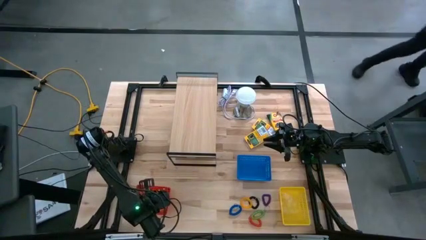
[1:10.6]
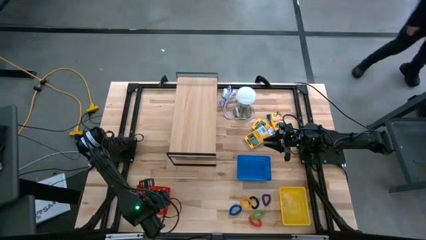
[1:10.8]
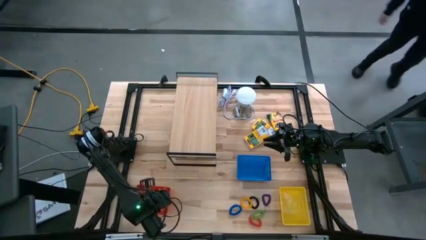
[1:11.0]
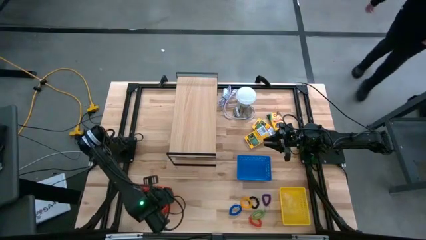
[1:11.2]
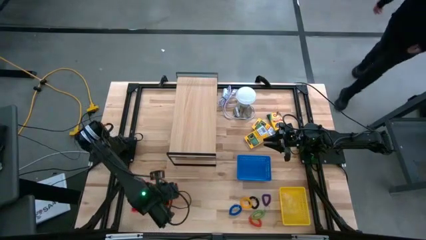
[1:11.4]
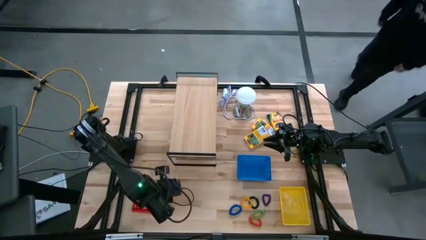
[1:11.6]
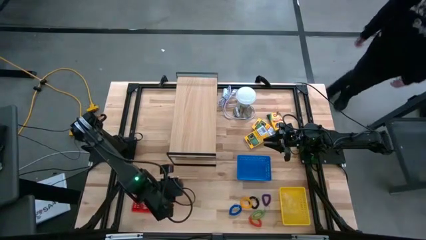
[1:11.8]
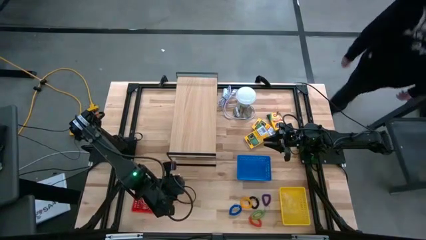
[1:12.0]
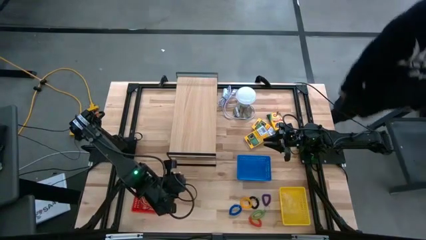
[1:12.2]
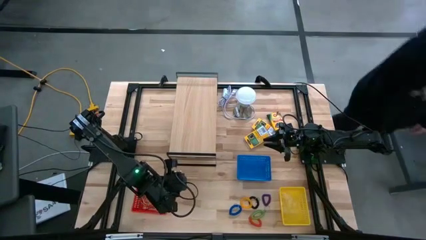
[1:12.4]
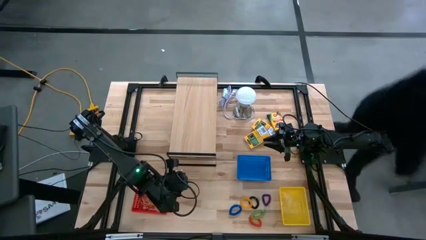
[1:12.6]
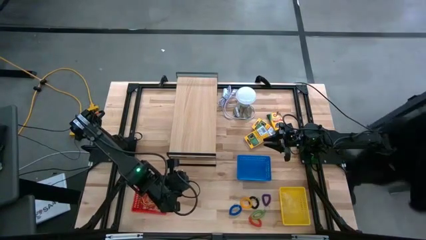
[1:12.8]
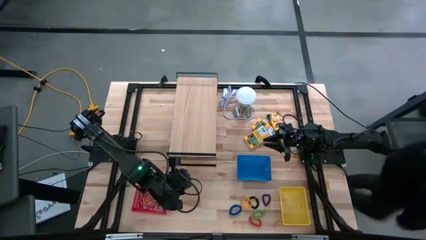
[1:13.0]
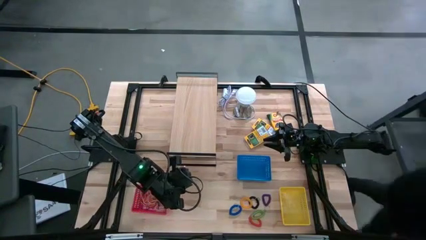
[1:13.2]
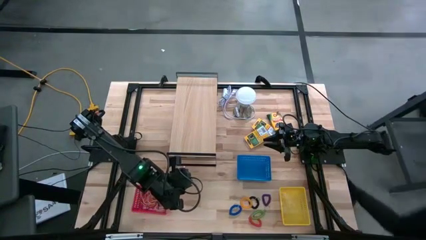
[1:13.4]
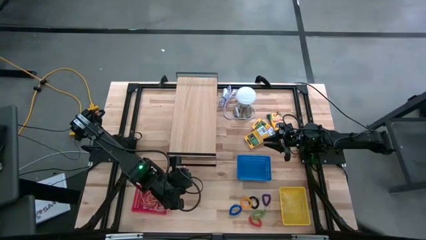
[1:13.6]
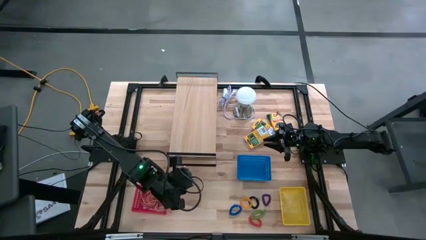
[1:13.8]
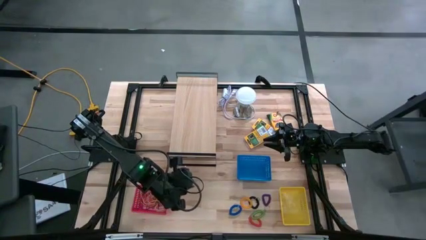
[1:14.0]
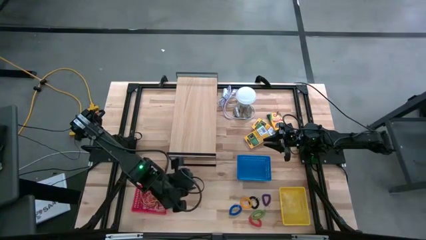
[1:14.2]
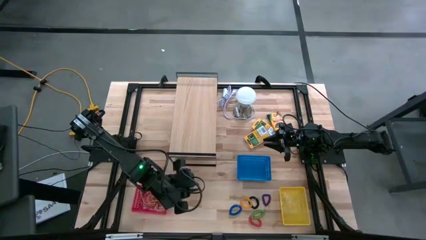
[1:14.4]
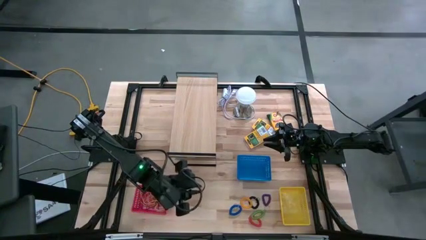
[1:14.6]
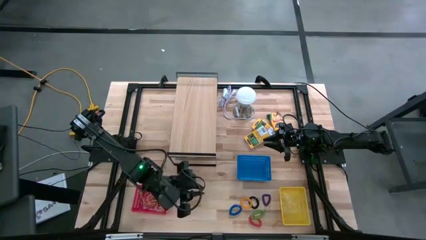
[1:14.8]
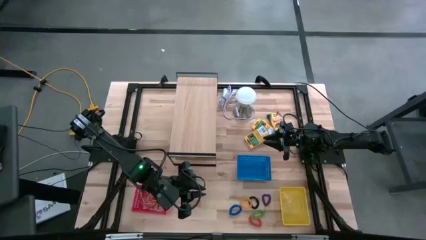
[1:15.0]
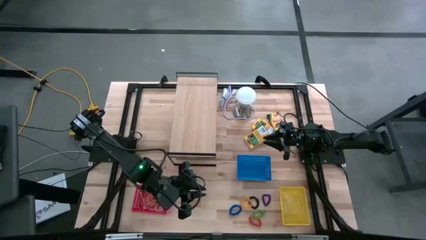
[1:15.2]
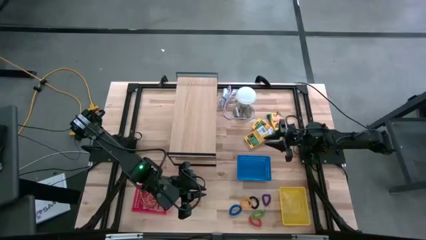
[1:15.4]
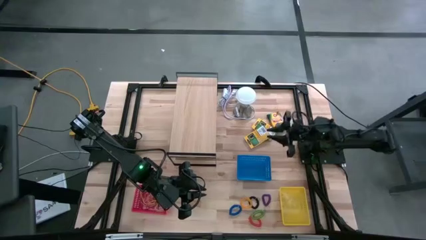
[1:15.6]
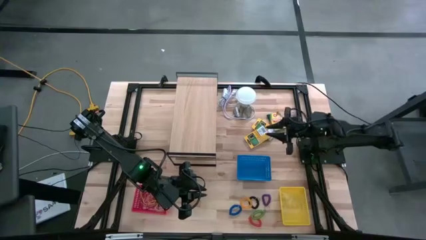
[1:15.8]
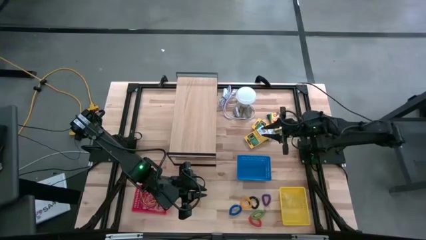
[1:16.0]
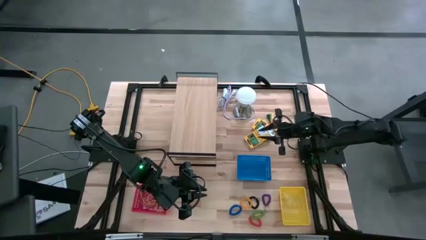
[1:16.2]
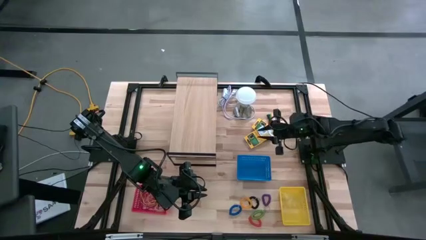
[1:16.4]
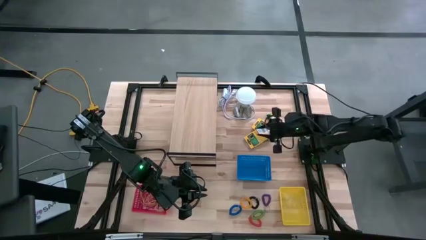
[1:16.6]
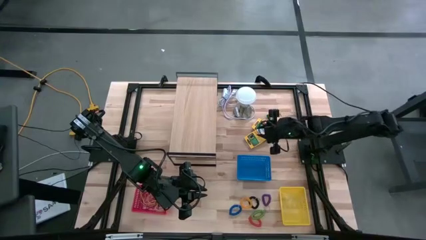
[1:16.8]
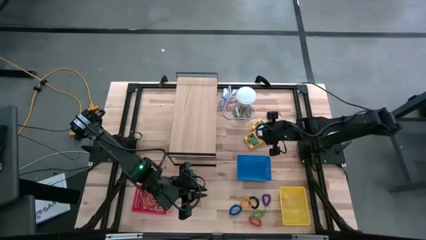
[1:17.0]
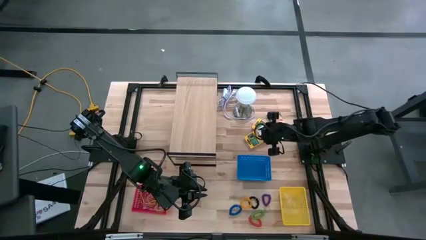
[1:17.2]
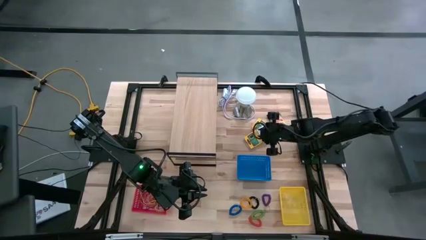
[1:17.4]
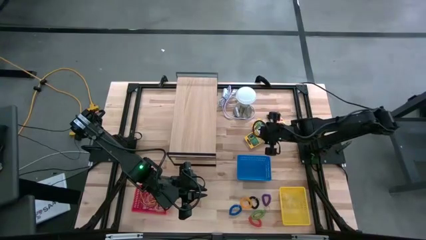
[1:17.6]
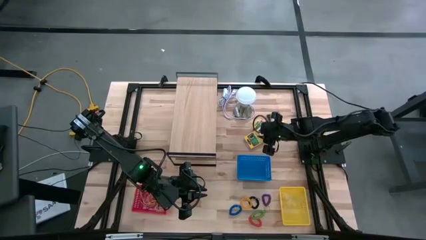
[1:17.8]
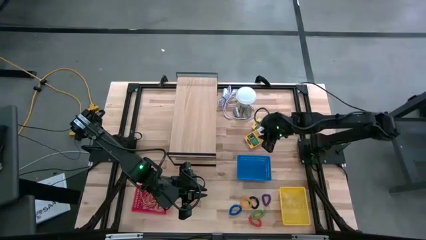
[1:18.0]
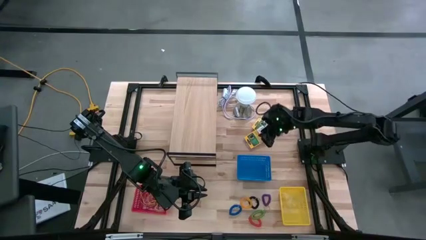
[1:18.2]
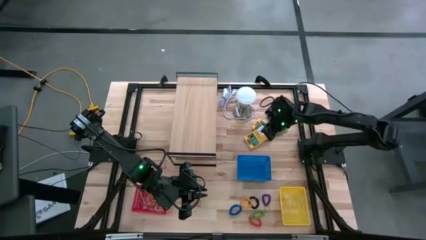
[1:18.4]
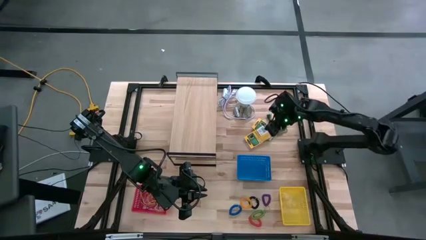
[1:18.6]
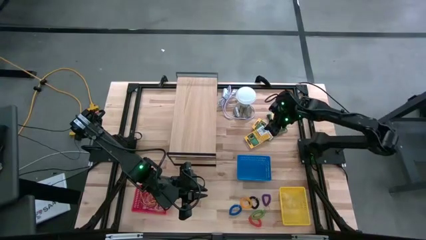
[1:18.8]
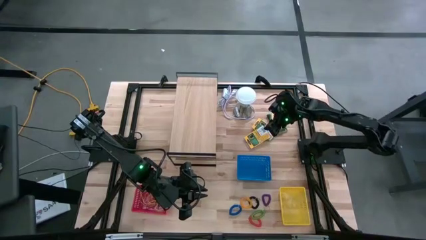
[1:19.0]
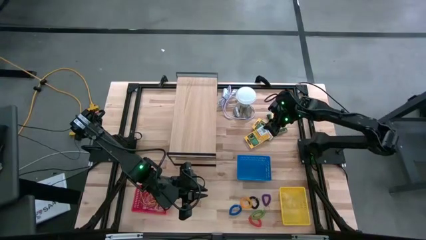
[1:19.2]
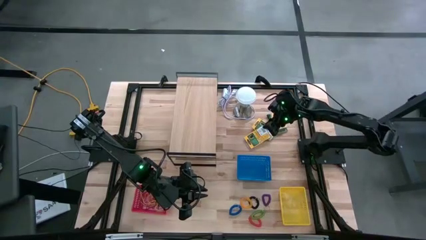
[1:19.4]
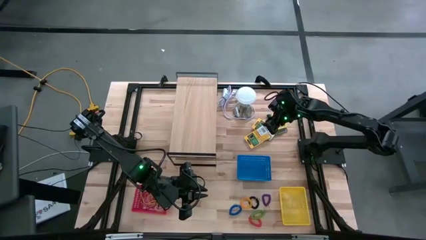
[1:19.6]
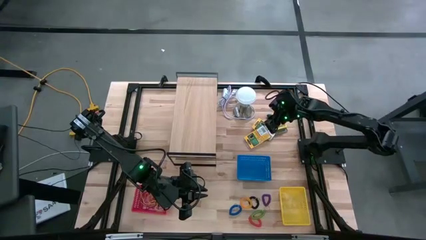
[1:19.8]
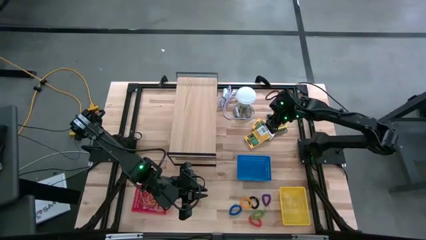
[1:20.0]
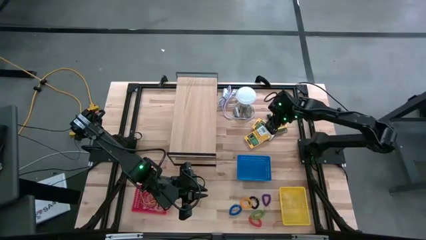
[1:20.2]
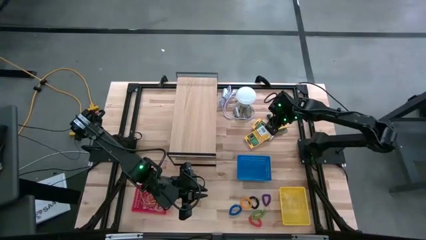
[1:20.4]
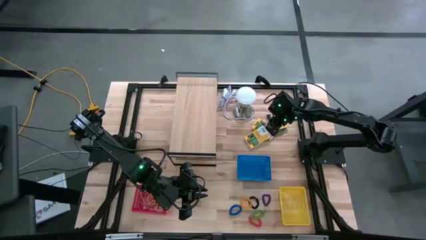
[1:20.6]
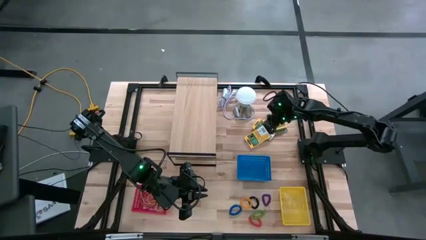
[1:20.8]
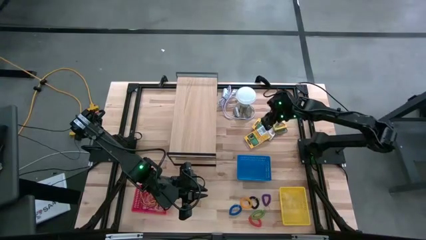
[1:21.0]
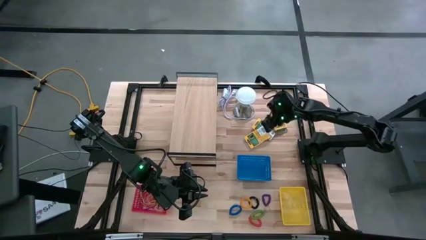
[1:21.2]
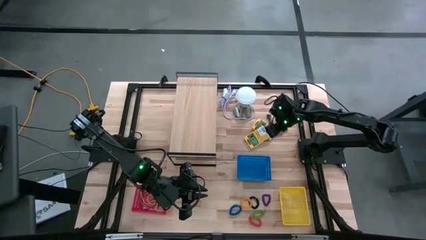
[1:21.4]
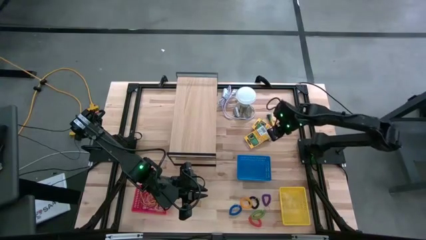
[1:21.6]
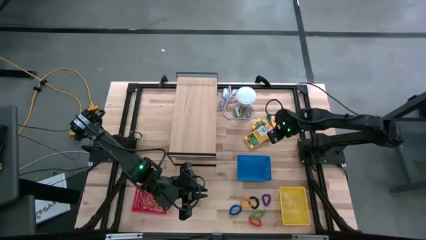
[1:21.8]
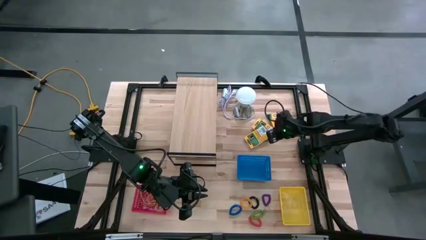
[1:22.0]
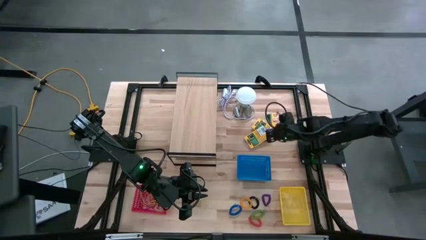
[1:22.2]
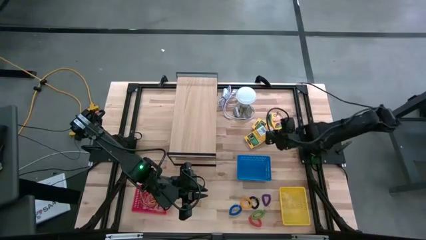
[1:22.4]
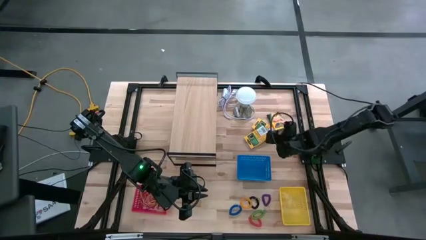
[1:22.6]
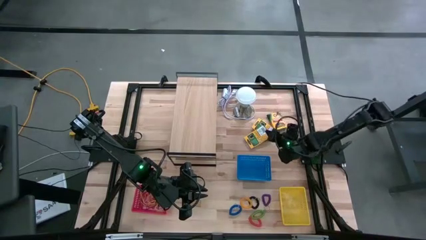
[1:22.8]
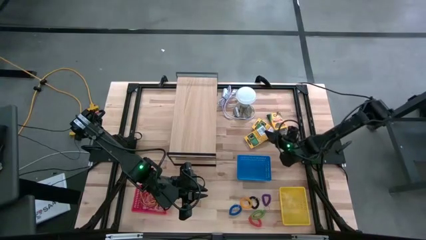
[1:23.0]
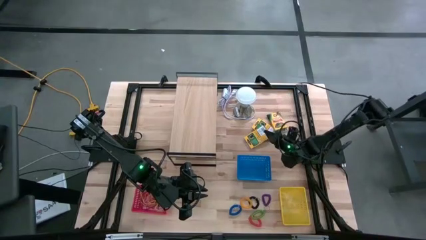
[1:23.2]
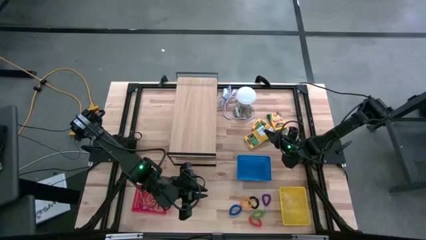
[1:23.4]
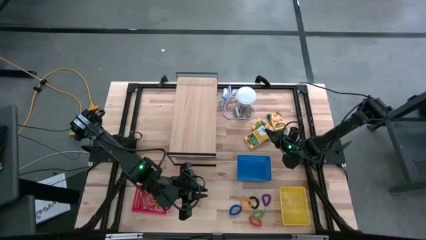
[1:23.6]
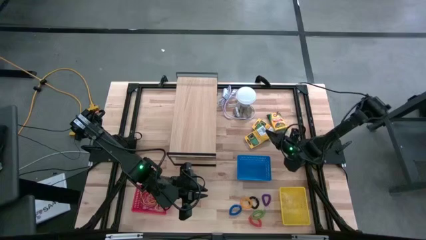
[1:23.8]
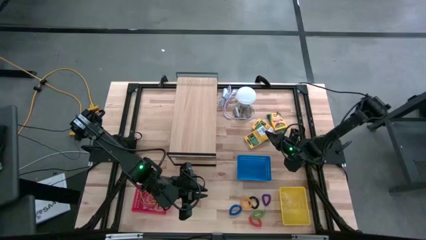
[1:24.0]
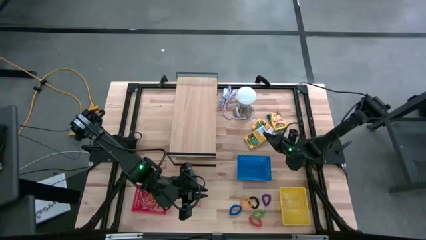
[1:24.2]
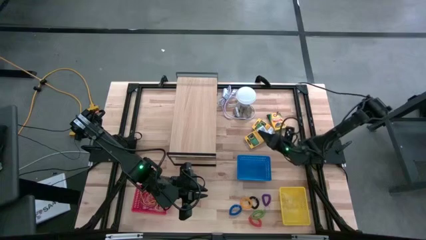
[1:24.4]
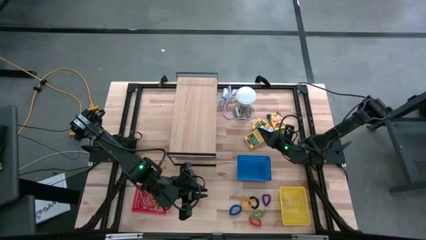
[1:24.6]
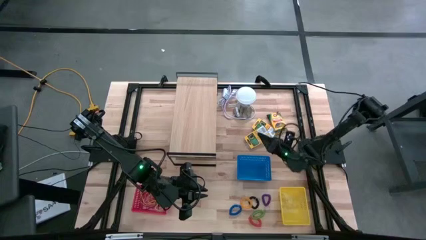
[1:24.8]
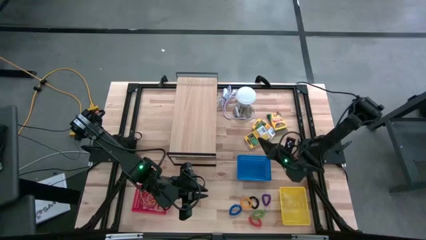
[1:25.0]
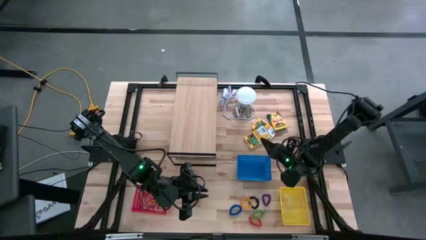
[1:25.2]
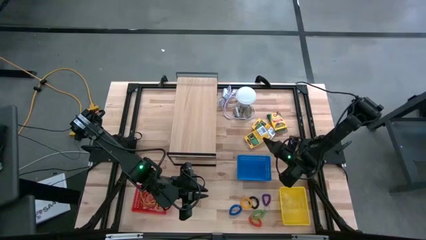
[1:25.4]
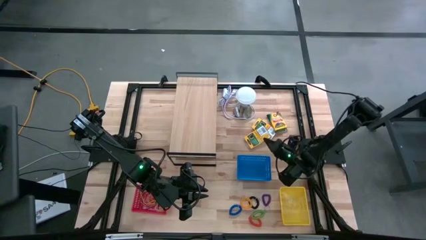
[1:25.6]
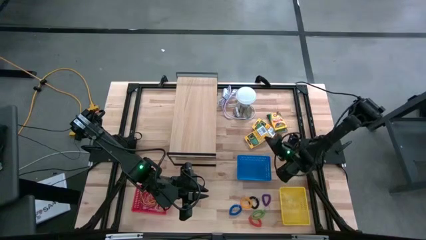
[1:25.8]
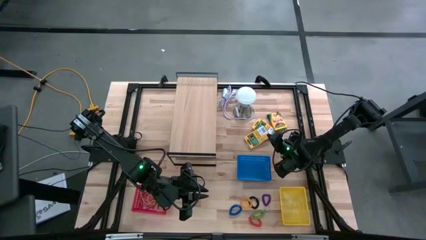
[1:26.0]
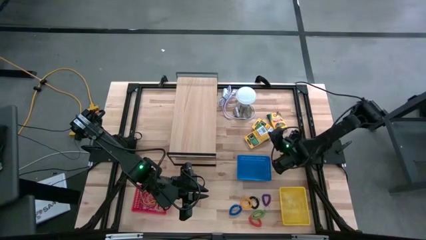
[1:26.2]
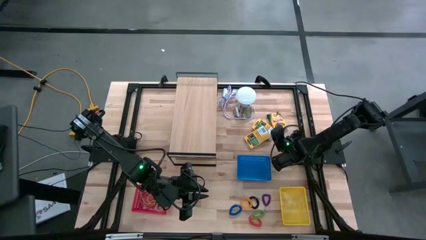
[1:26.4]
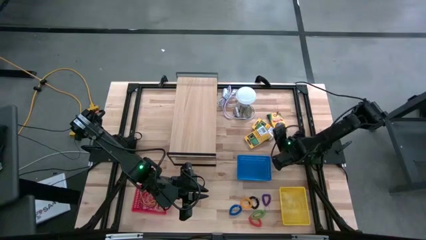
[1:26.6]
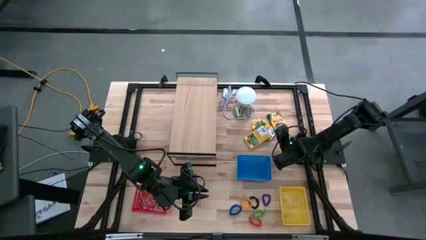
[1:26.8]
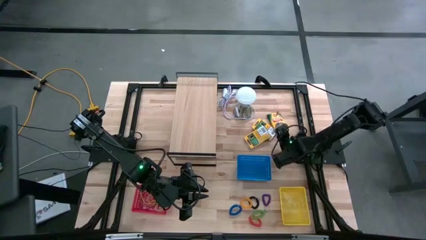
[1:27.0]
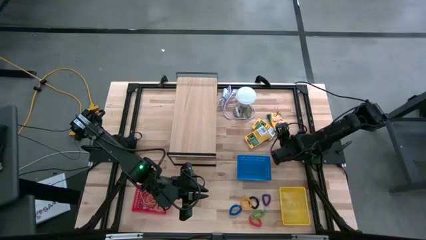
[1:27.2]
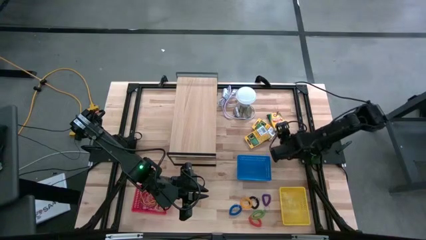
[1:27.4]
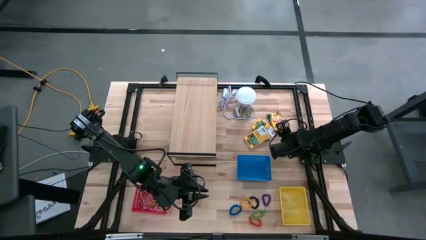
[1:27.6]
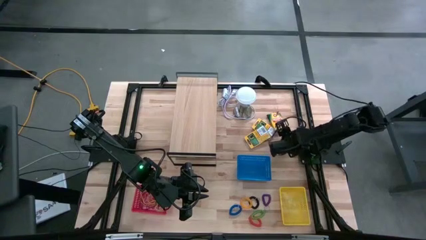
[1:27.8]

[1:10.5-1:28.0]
Task: Pick & Place Office Desk Supplies
Put the bottom yellow crayon box into the blue bin

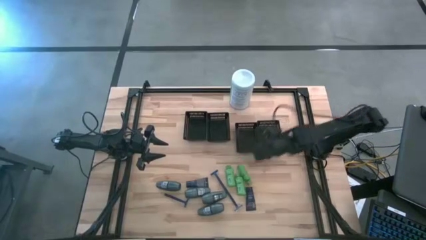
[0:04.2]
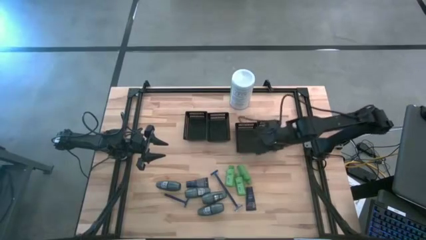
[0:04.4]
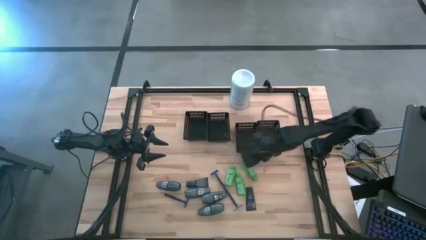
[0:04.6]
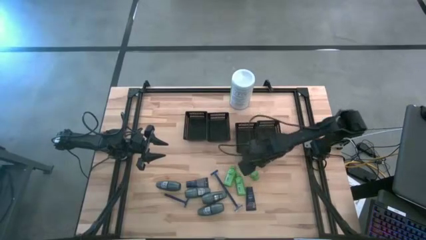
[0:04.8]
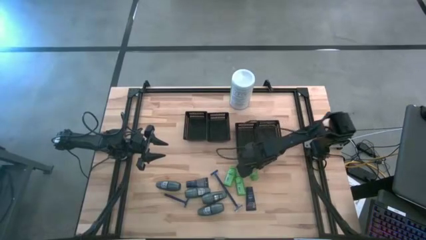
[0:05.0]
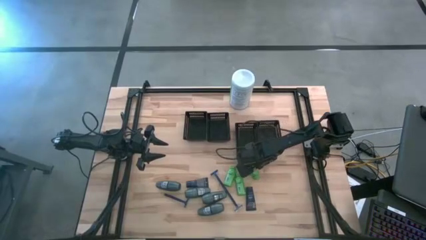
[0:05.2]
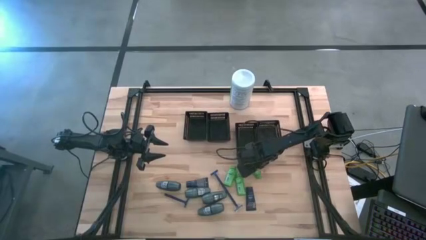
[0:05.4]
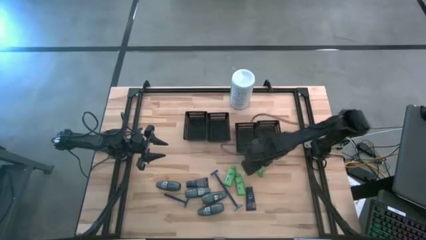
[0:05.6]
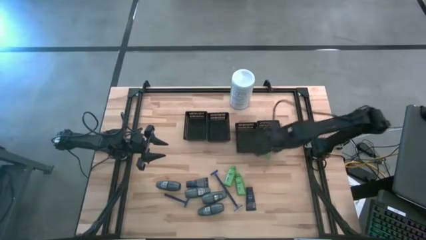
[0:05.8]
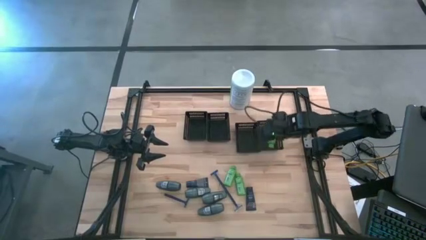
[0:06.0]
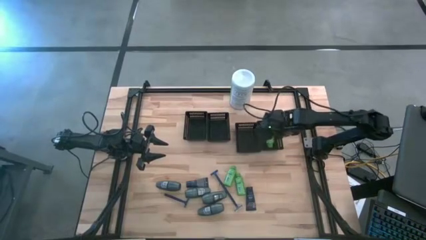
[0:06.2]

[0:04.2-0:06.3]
Task: Pick & Place Travel size toiletries
Put the green shampoo into the right black bin
